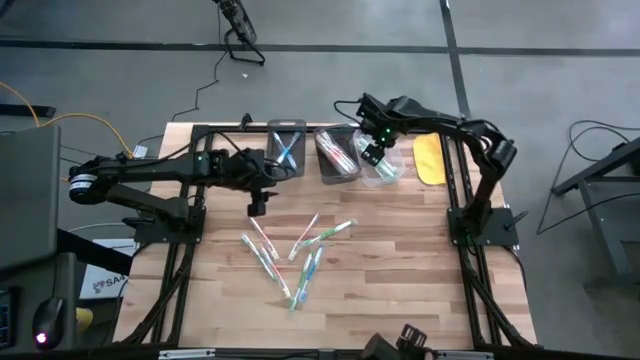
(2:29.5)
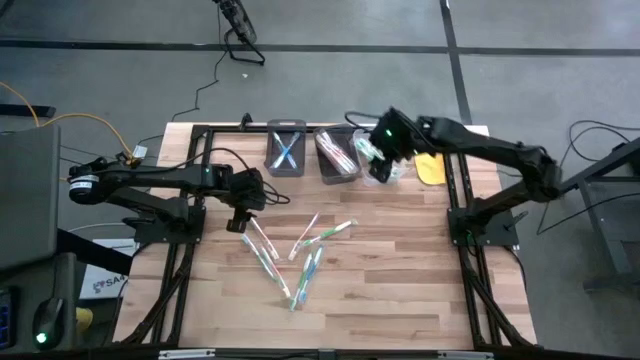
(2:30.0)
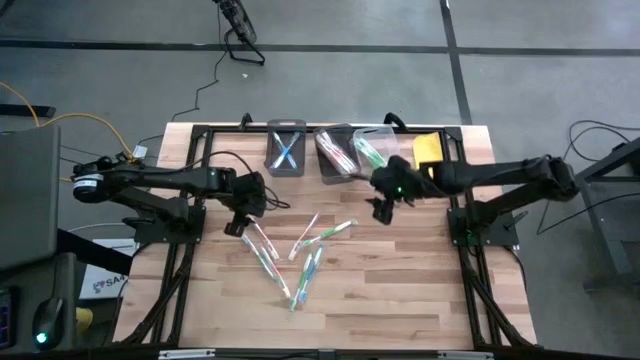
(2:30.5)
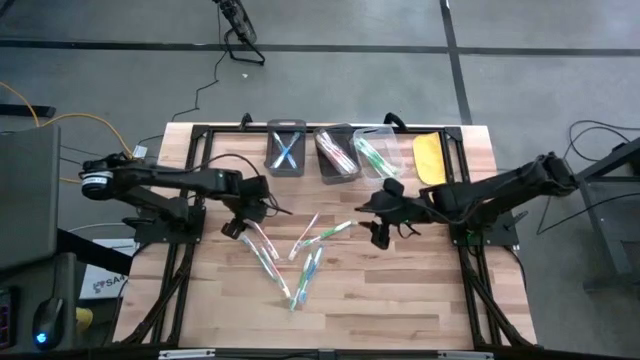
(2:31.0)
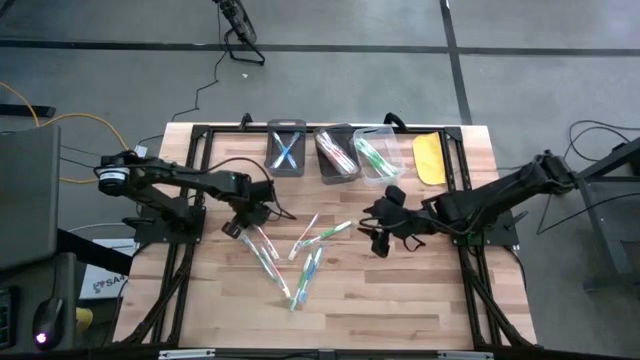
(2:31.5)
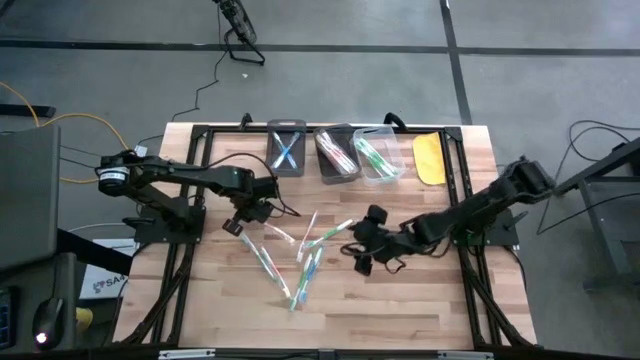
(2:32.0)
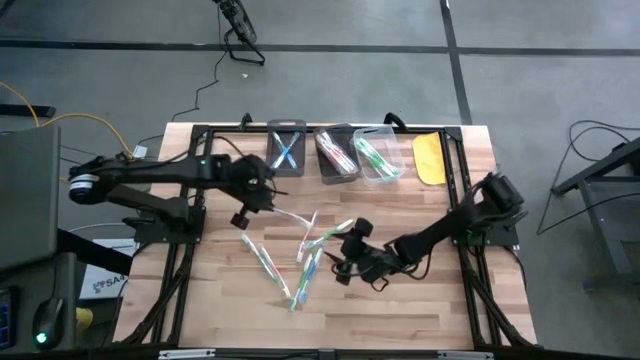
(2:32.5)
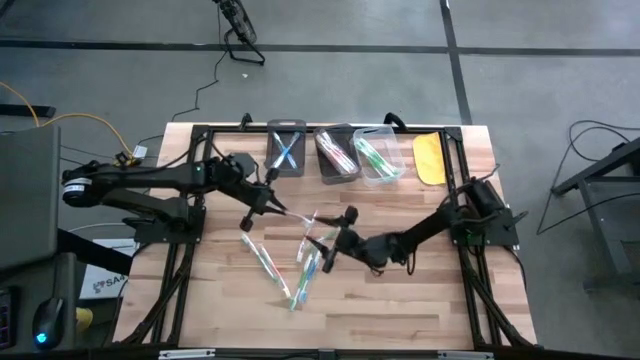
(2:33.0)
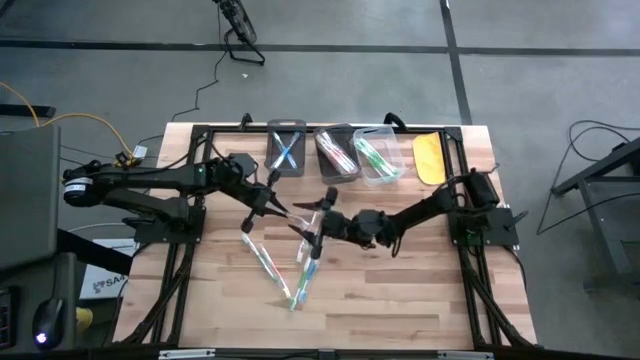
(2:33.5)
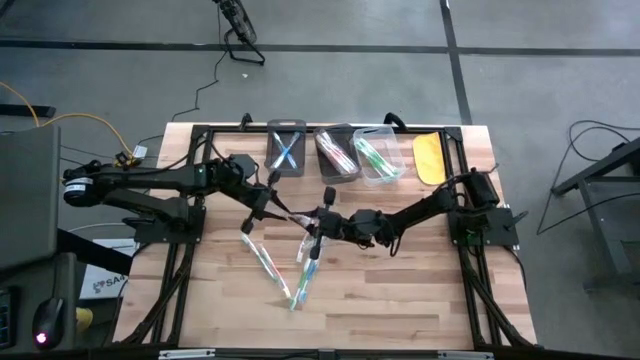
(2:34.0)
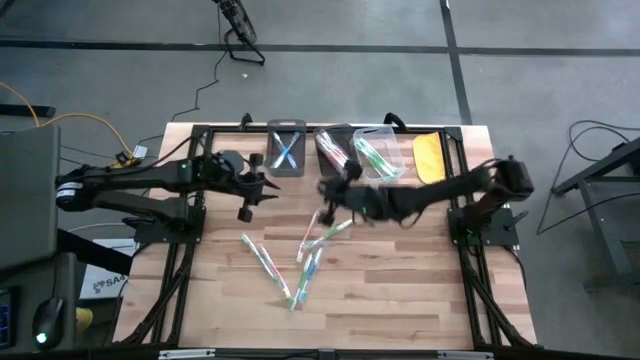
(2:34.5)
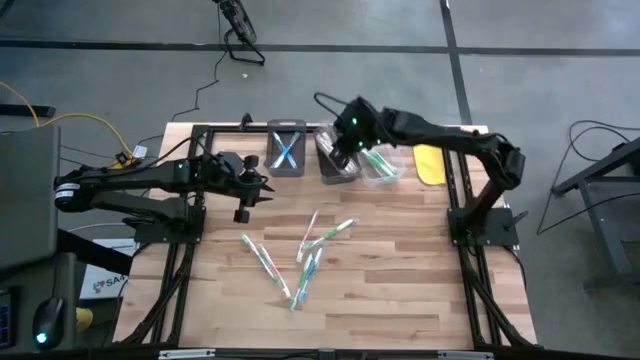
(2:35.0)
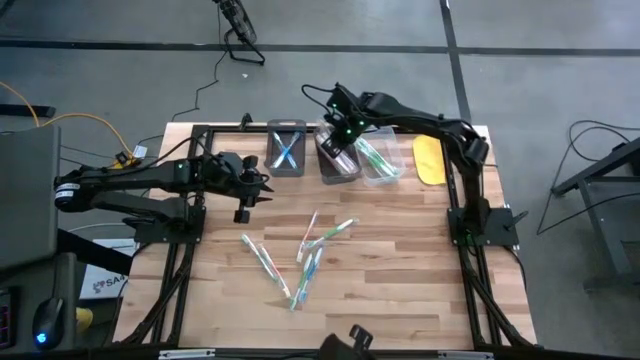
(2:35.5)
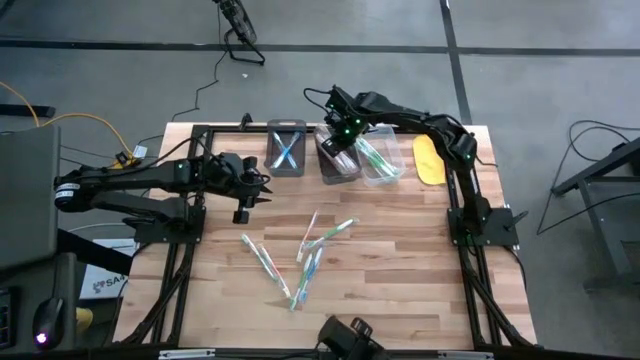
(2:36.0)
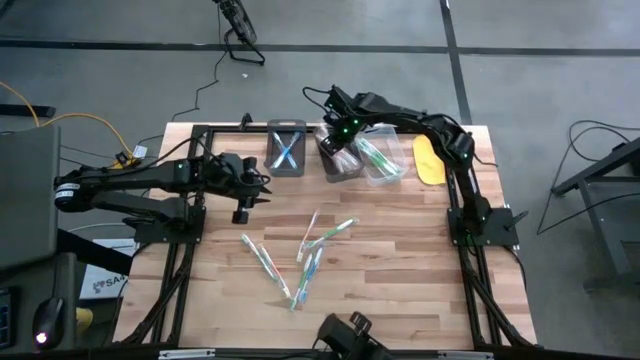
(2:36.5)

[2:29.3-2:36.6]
Task: Pick & Place Toothbrushes
Put the orange toothbrush into the right black bin

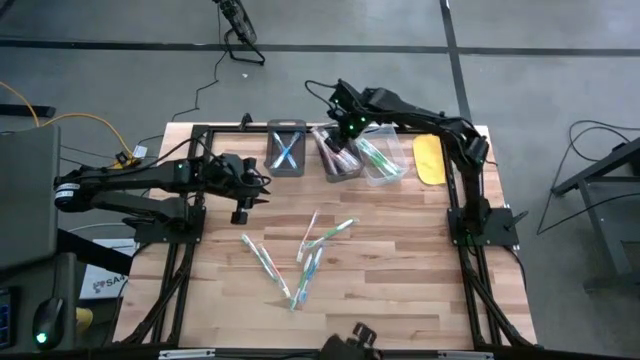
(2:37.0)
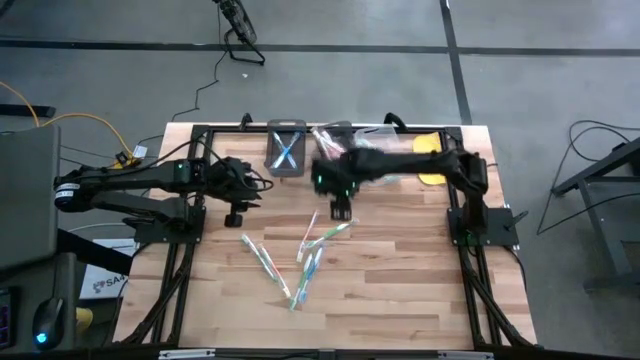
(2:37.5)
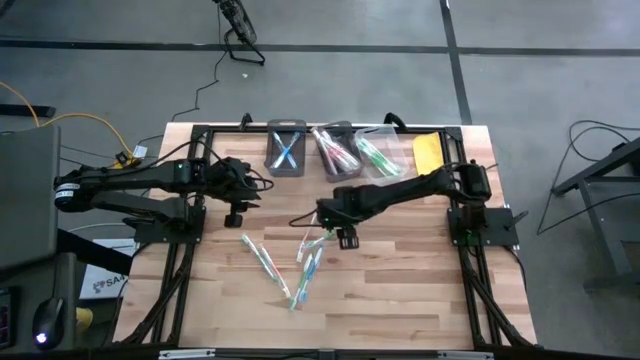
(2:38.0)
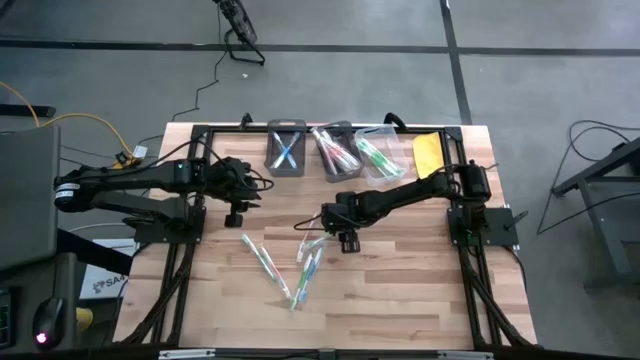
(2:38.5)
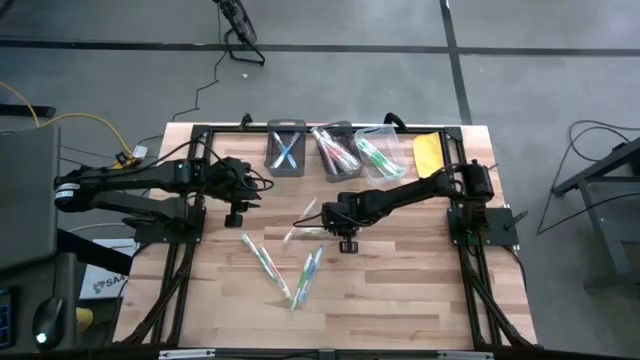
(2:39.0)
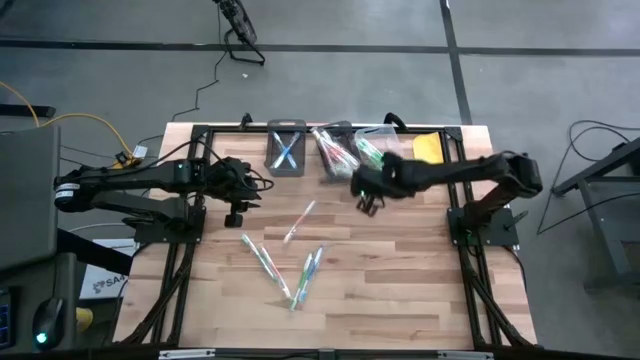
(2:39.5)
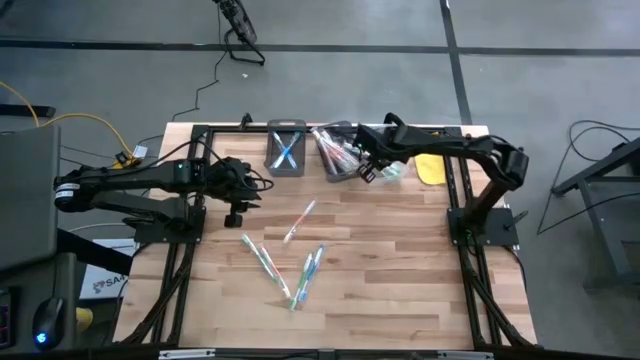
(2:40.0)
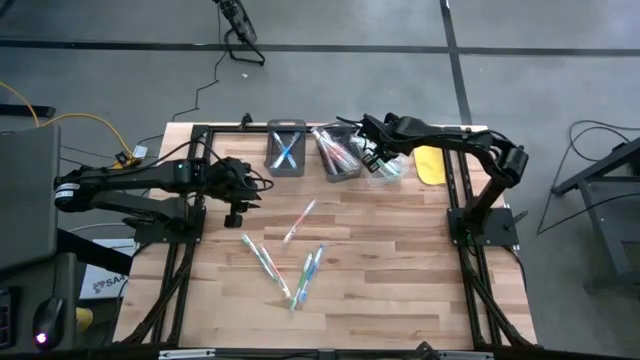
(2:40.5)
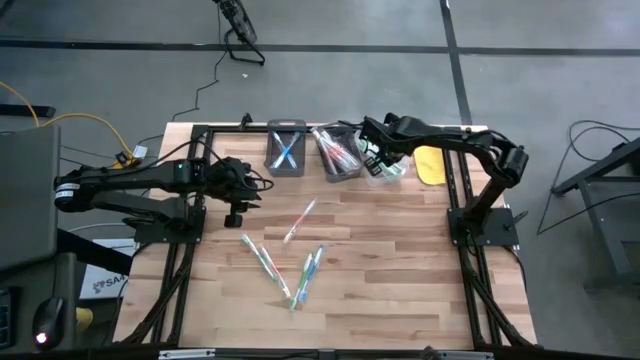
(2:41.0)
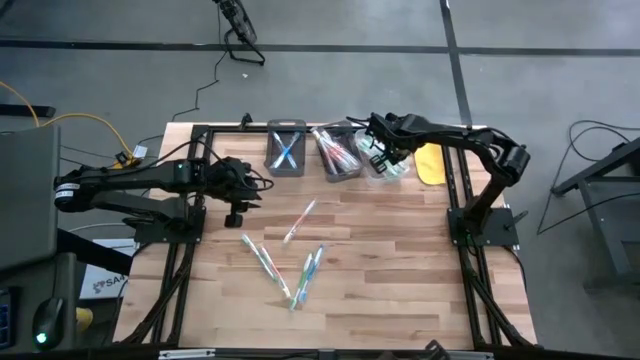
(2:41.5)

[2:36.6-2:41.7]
Put the green toothbrush into the transparent bin

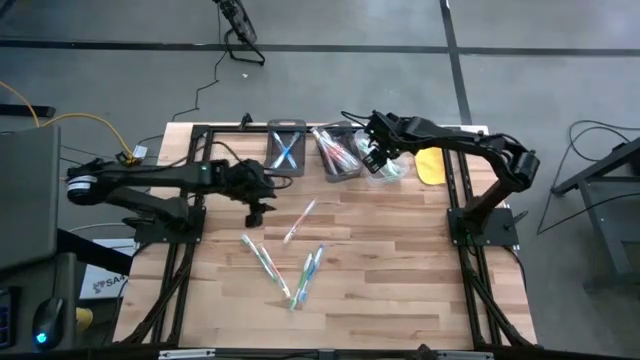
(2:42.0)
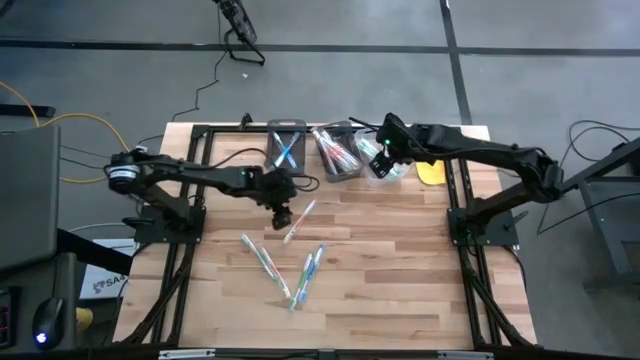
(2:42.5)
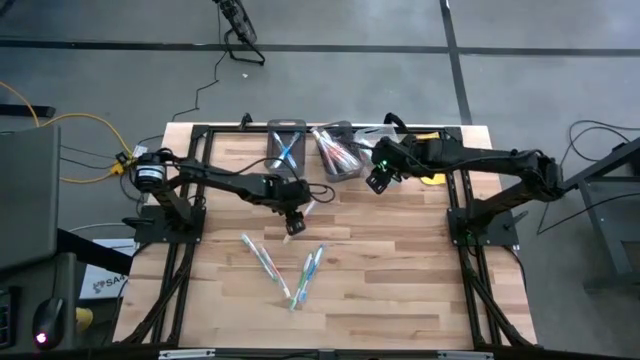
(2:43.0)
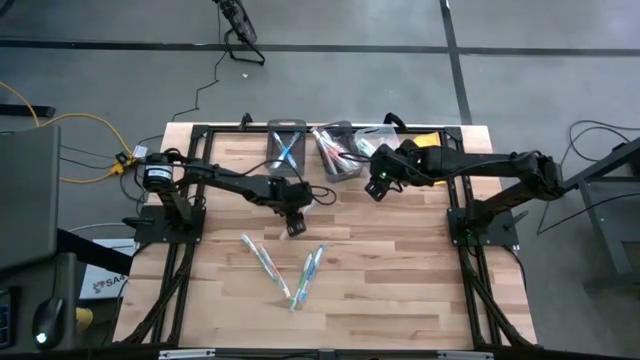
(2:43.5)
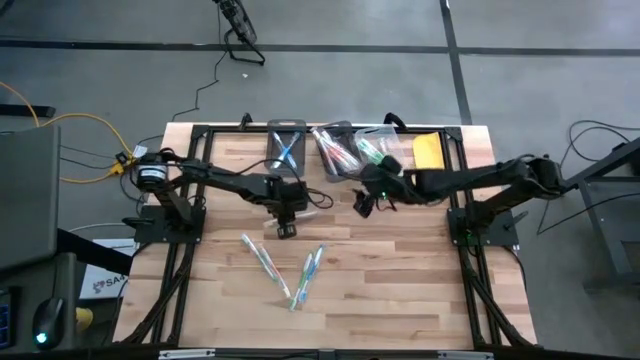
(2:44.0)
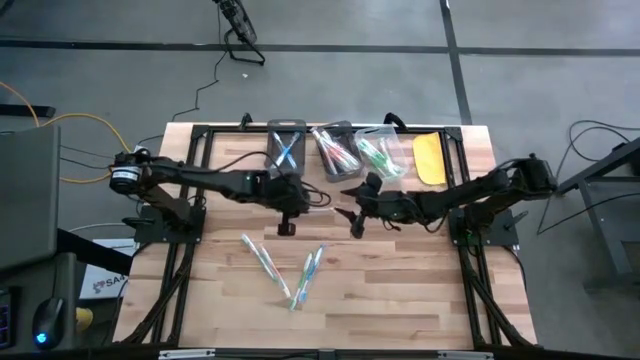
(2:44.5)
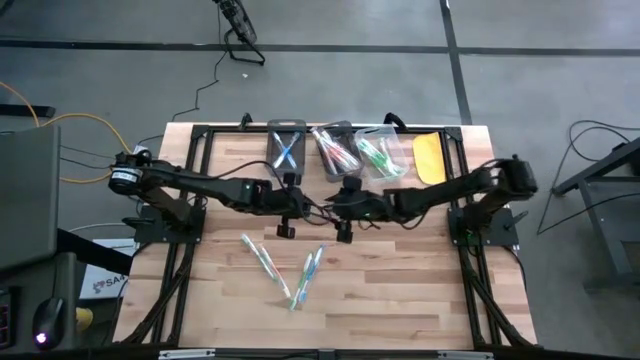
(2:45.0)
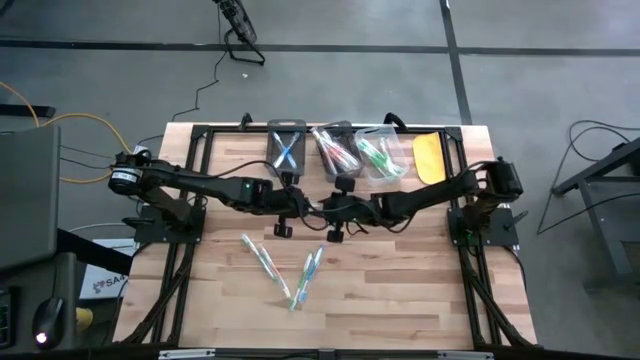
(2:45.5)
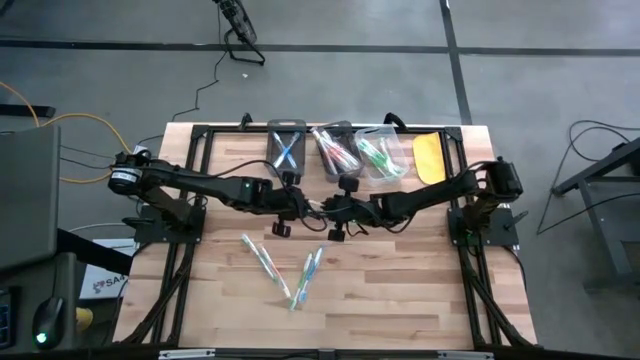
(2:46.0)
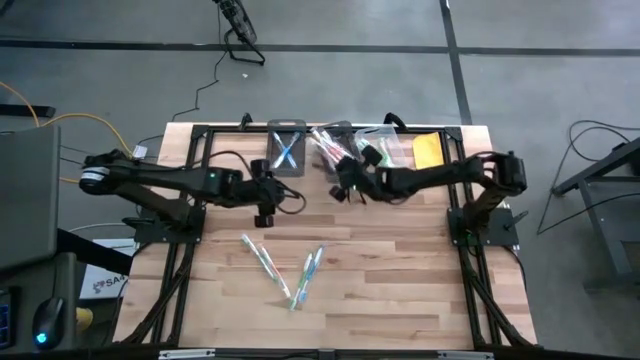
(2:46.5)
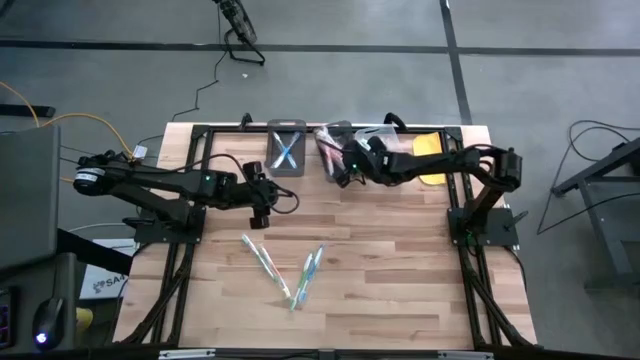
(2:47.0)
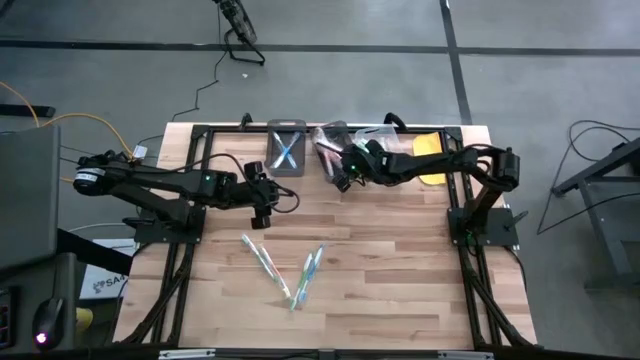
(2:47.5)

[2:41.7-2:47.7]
Put the orange toothbrush into the right black bin

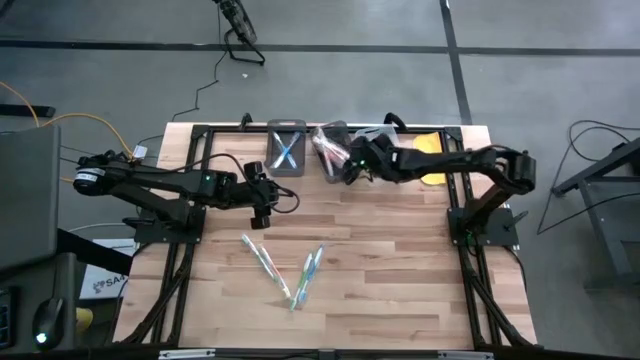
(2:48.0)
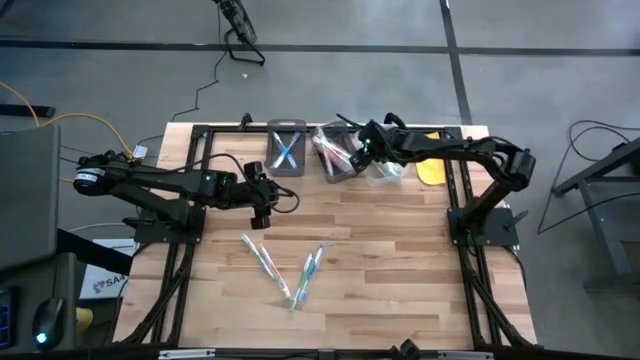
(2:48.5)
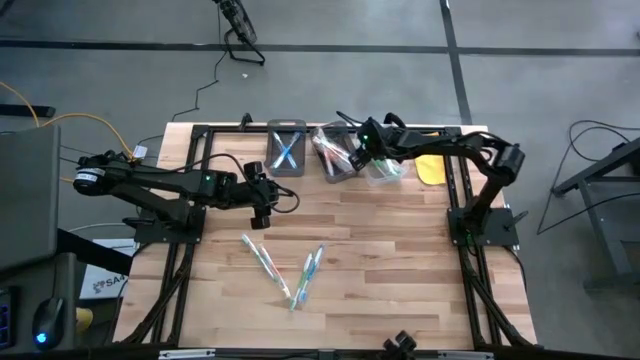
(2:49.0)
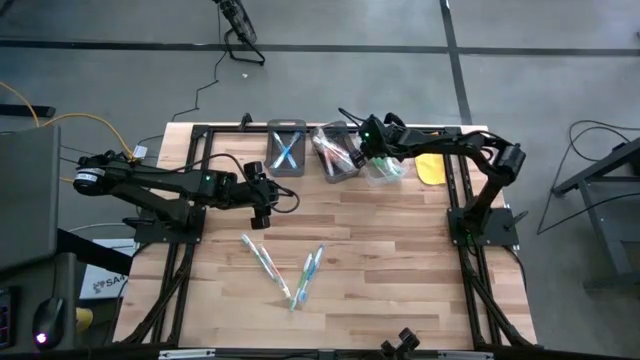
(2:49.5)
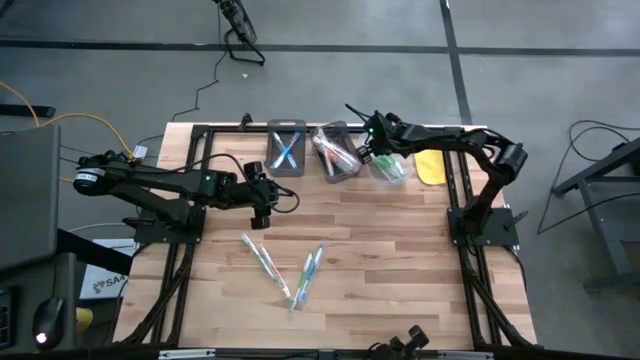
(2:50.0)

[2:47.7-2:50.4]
Adjust the green toothbrush in the bin

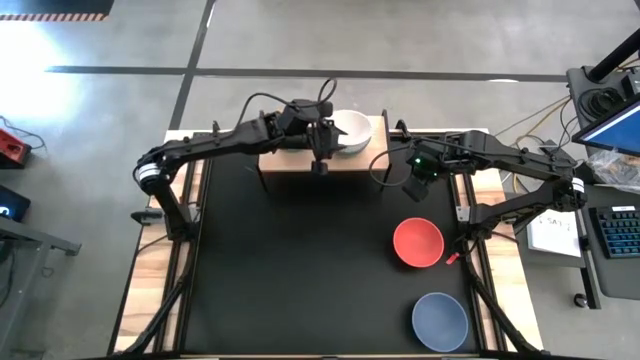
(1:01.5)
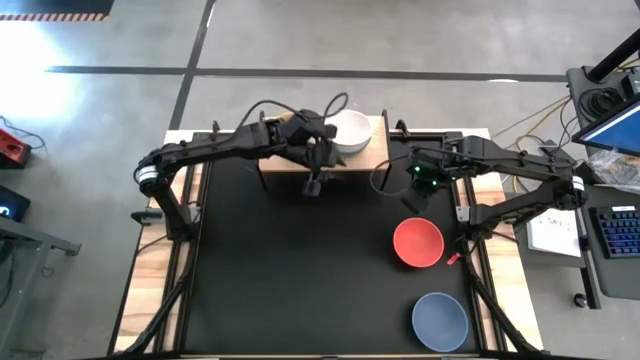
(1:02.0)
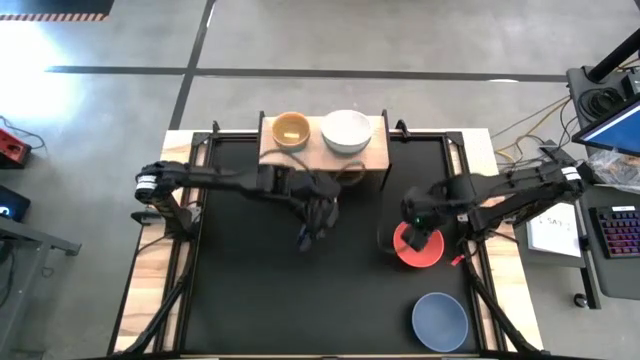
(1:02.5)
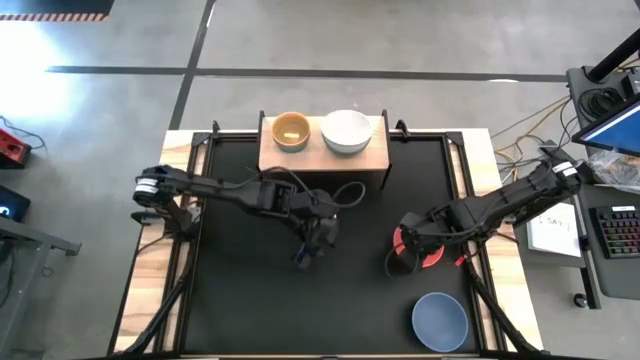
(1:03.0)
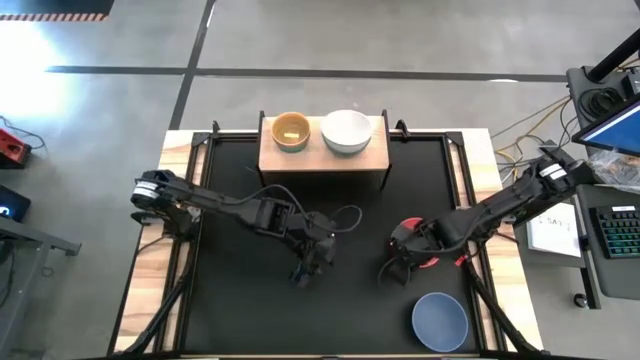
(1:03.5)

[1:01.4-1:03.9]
Task: Place and stack bowls onto a shelf
Stack the large orange bowl on top of the large white bowl on the shelf
